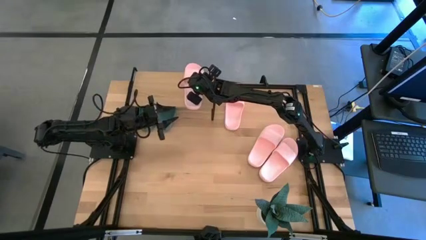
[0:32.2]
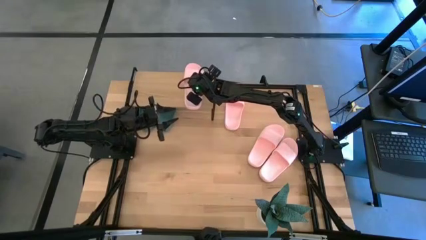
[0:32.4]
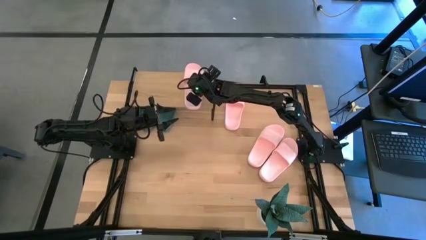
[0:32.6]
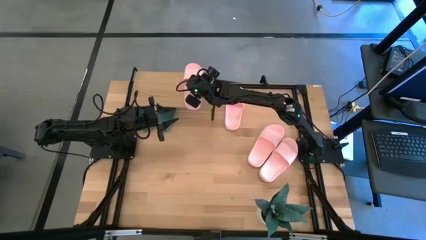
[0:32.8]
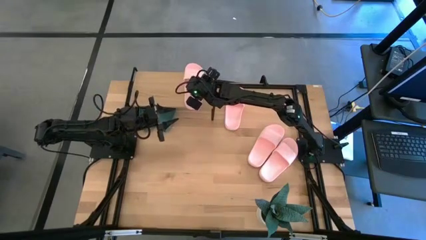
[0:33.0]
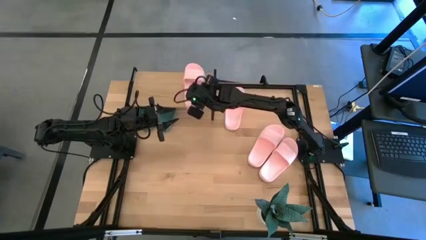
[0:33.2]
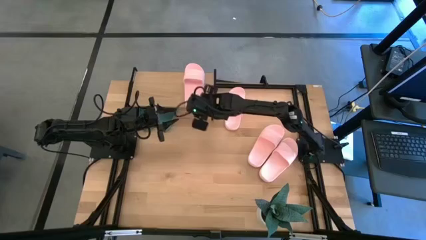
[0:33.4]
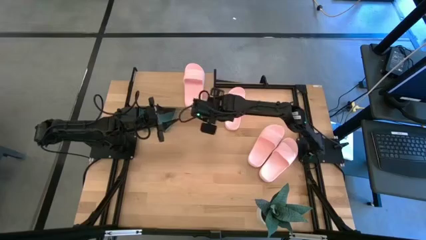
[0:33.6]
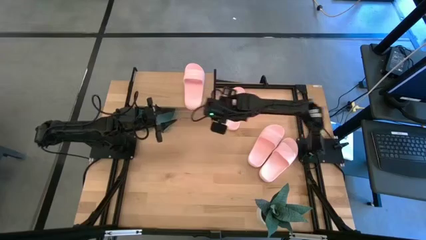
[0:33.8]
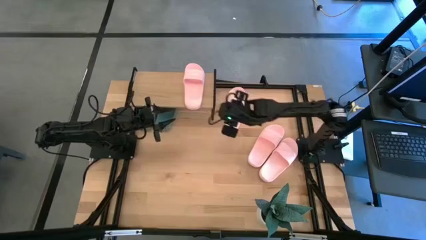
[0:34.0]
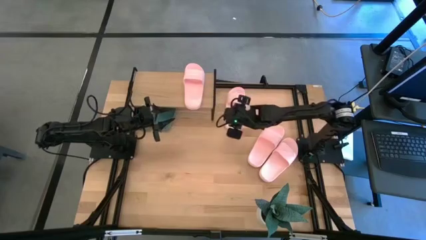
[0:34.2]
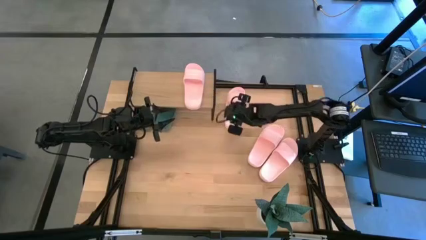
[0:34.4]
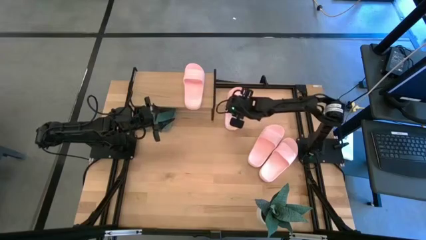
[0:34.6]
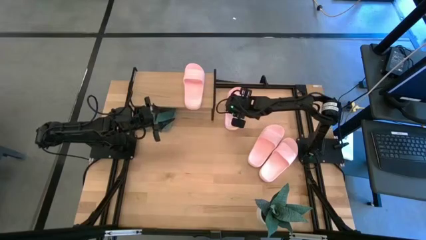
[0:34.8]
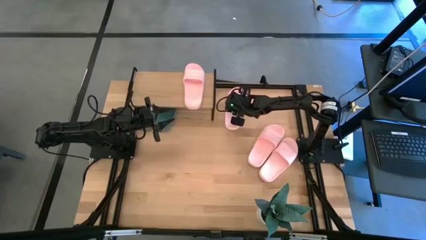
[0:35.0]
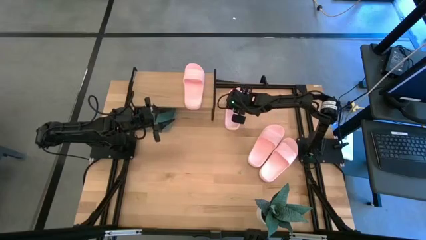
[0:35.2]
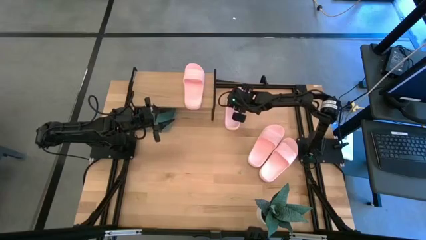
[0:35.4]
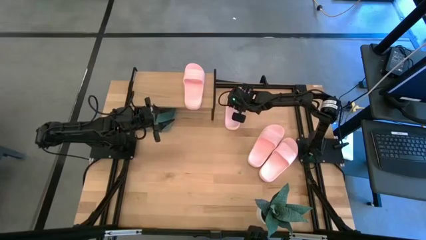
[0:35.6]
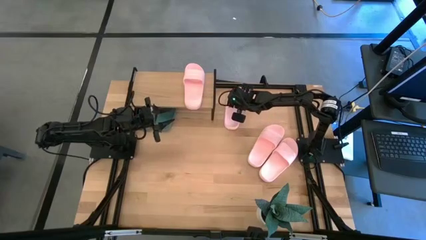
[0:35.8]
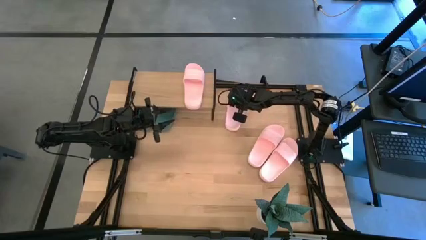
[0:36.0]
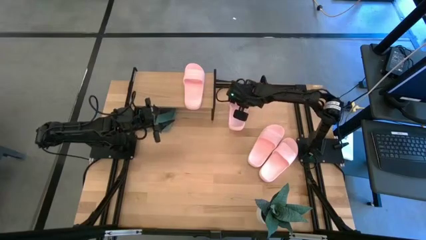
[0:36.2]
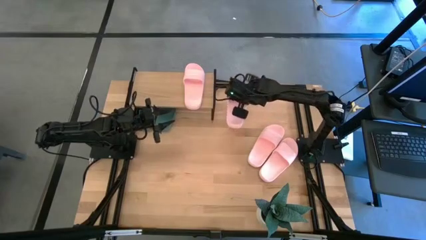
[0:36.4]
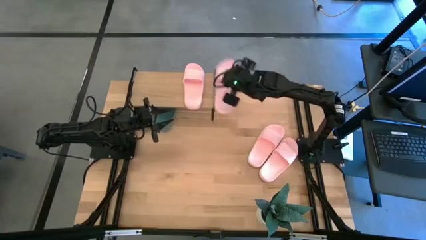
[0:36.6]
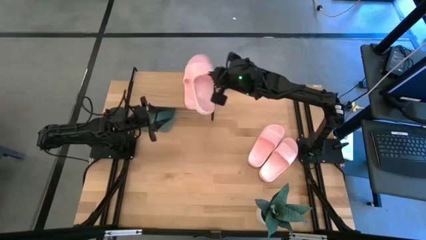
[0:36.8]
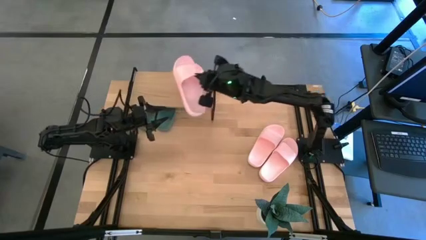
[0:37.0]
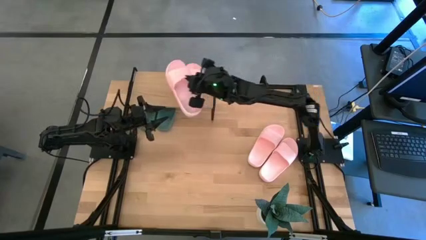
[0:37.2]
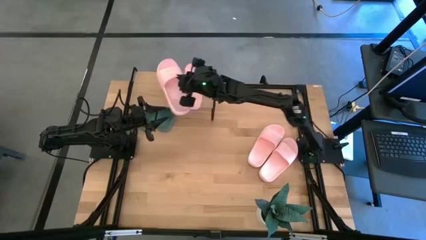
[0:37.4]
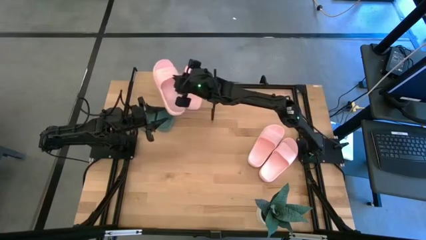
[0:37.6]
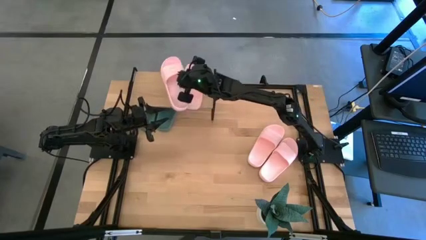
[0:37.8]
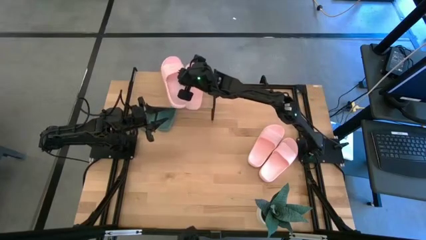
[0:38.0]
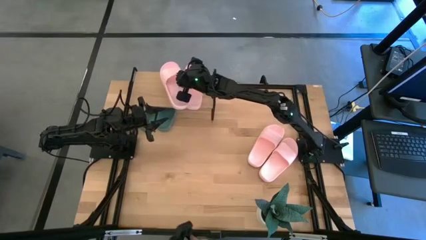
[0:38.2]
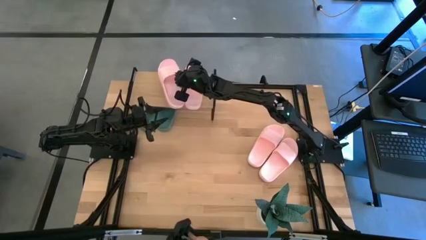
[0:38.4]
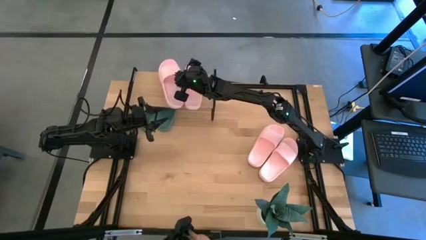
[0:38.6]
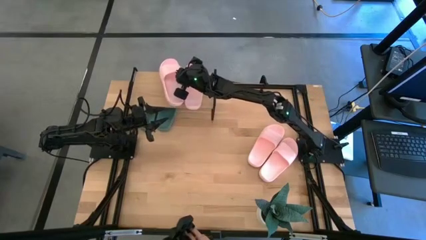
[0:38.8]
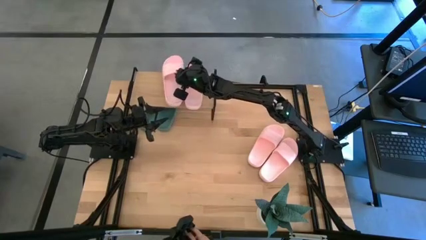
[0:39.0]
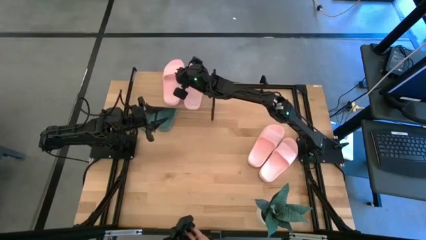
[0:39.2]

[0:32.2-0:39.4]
Task: Pick and place slides into the shelf
Put the pink slide on the shelf

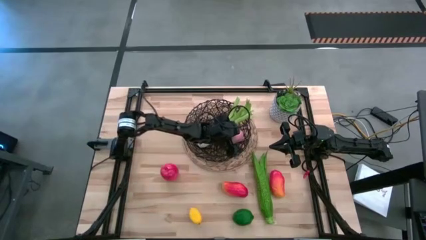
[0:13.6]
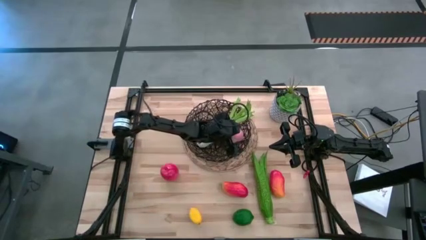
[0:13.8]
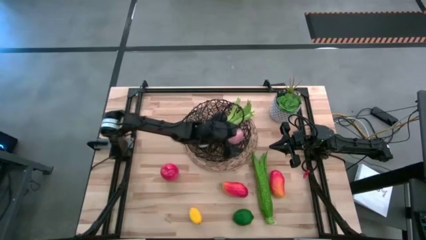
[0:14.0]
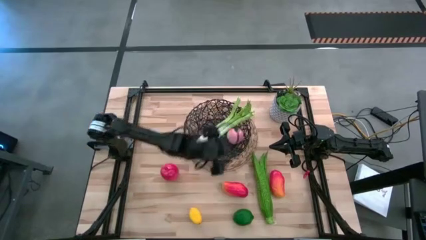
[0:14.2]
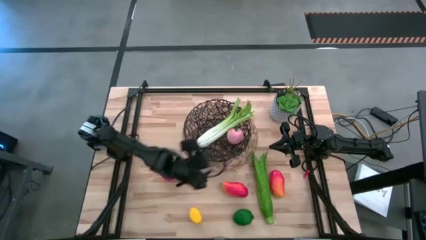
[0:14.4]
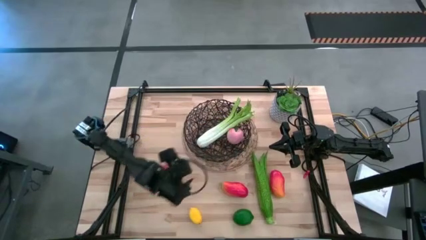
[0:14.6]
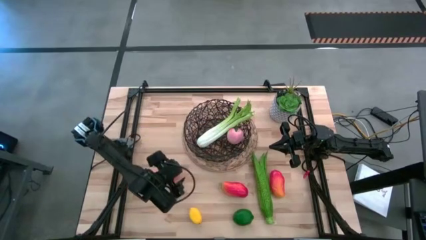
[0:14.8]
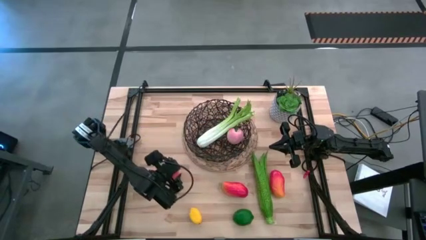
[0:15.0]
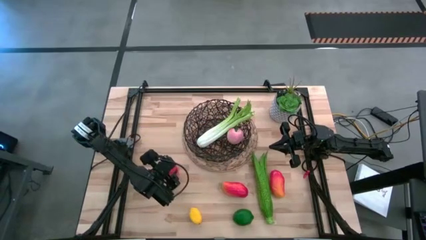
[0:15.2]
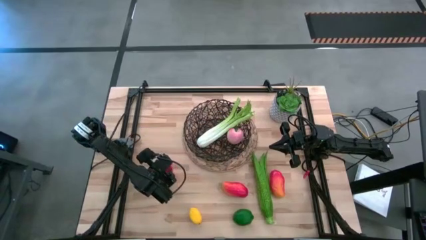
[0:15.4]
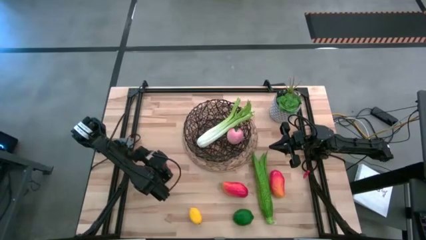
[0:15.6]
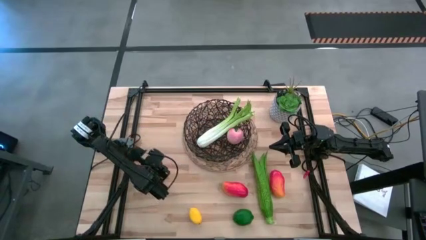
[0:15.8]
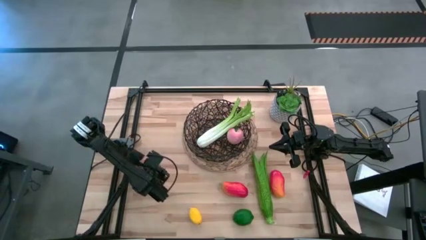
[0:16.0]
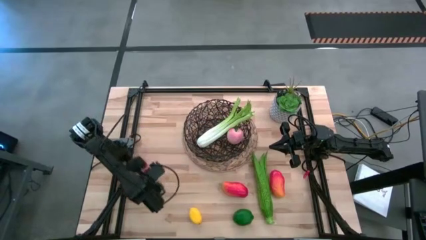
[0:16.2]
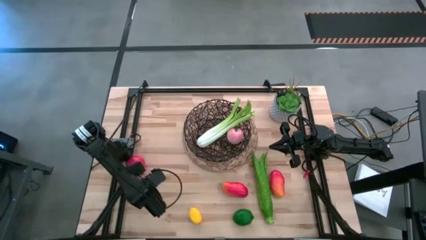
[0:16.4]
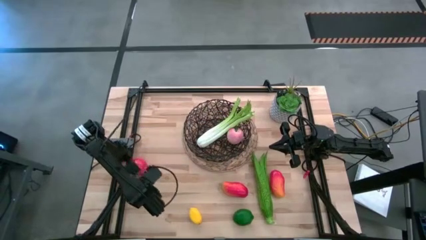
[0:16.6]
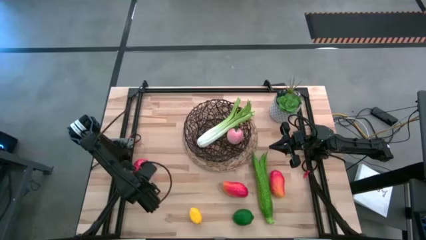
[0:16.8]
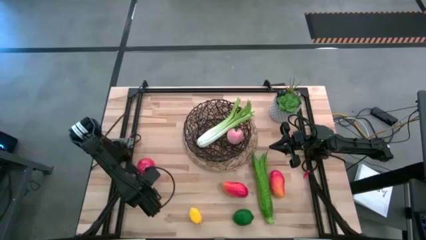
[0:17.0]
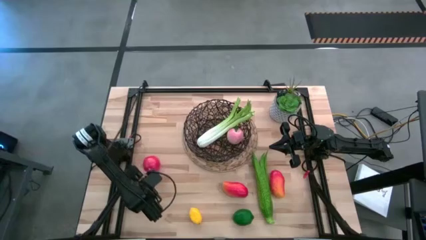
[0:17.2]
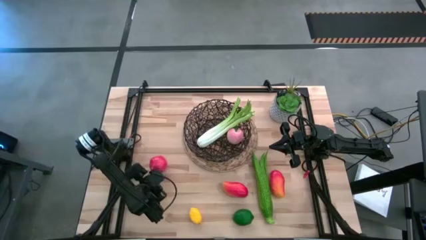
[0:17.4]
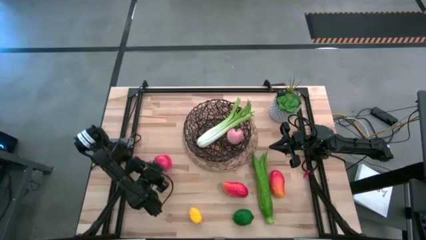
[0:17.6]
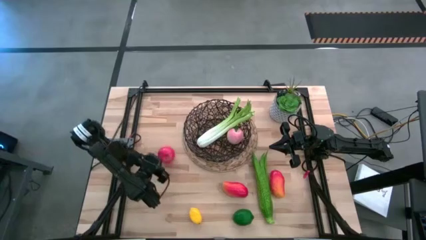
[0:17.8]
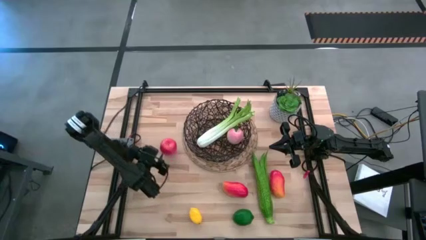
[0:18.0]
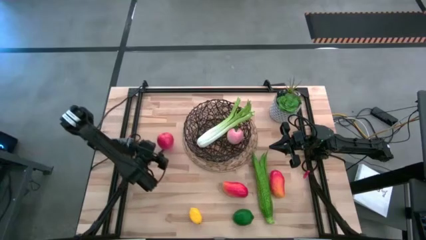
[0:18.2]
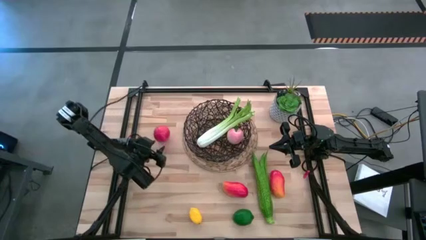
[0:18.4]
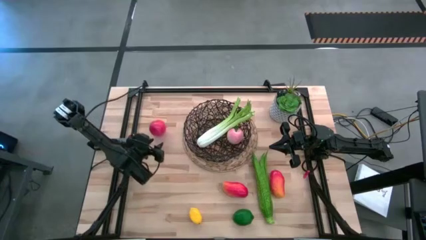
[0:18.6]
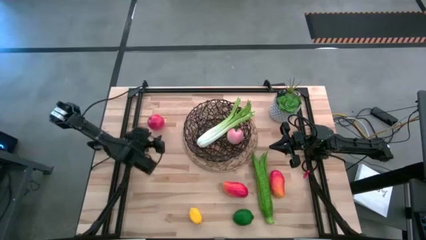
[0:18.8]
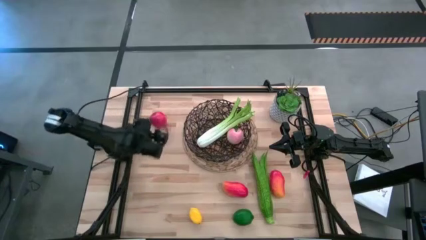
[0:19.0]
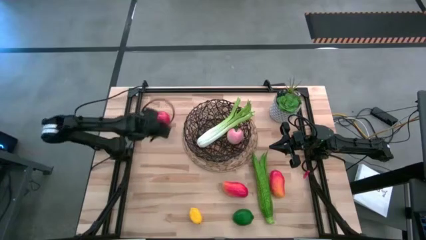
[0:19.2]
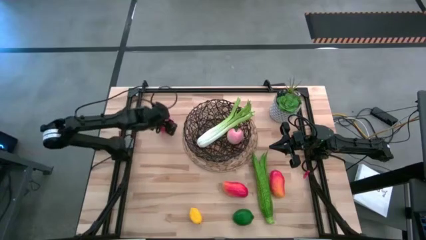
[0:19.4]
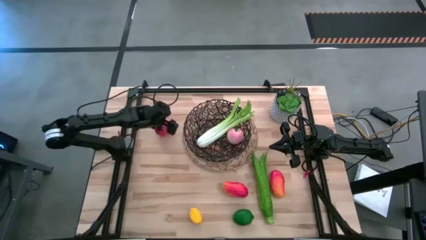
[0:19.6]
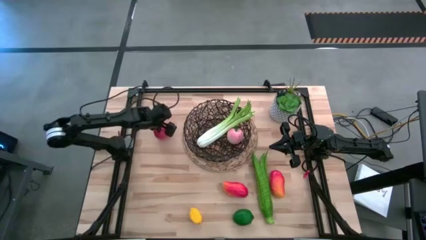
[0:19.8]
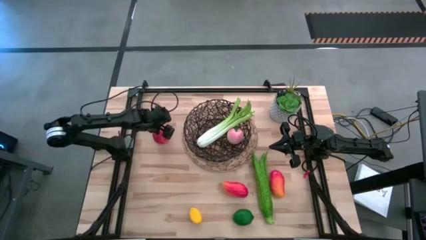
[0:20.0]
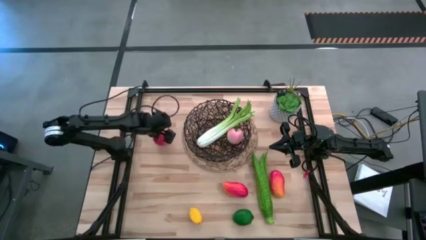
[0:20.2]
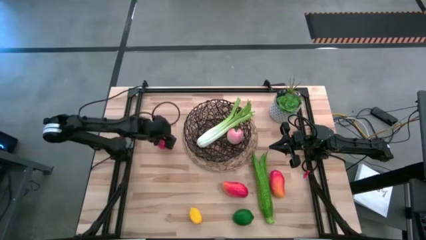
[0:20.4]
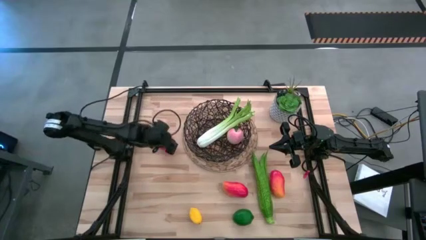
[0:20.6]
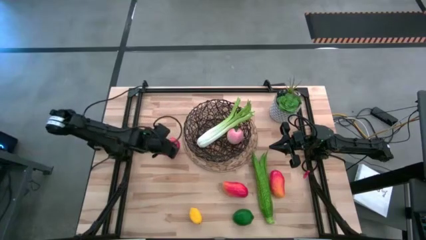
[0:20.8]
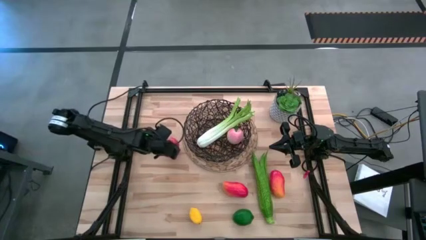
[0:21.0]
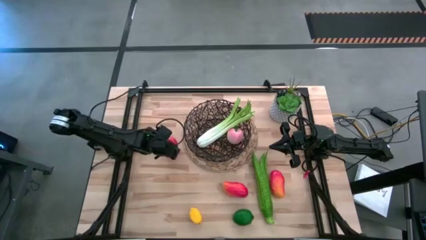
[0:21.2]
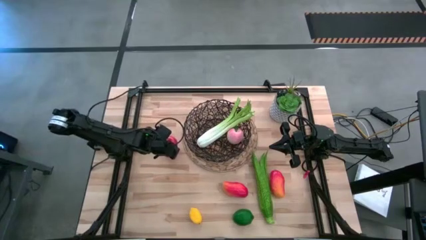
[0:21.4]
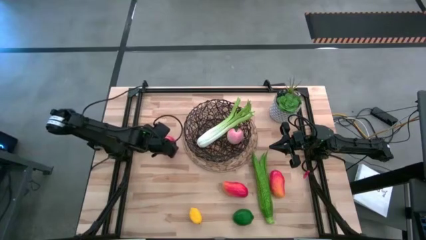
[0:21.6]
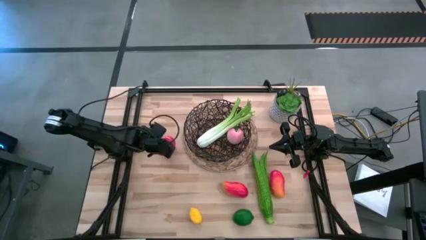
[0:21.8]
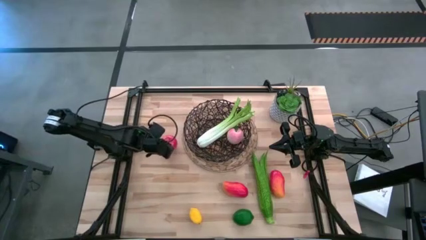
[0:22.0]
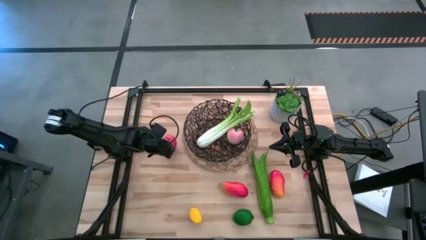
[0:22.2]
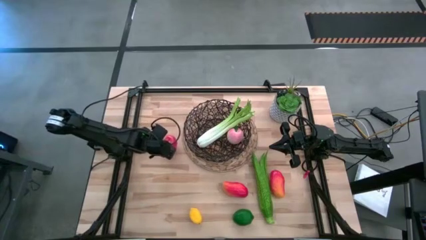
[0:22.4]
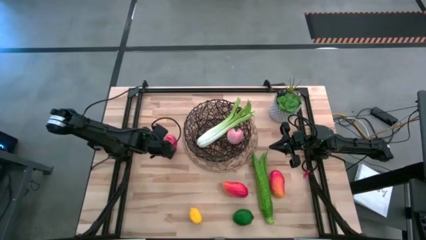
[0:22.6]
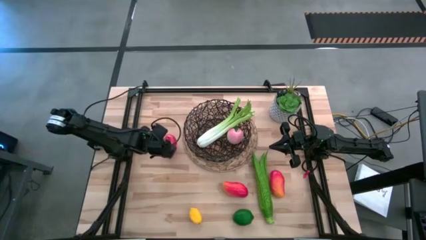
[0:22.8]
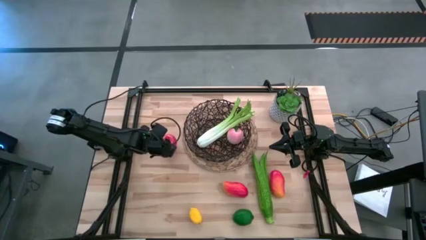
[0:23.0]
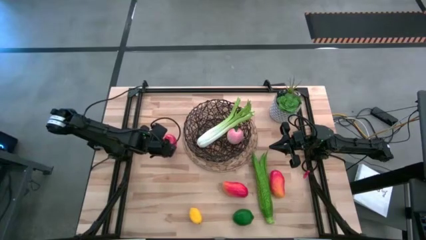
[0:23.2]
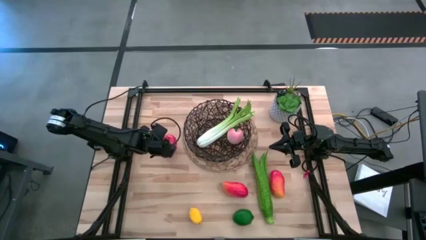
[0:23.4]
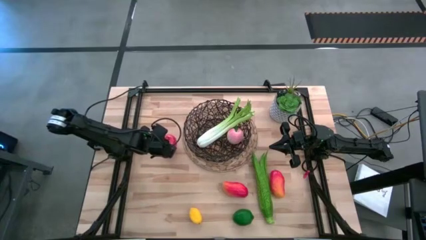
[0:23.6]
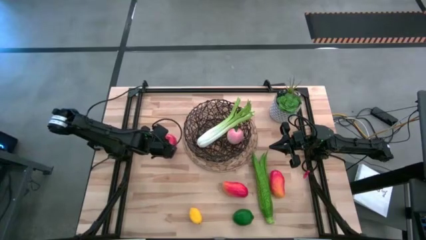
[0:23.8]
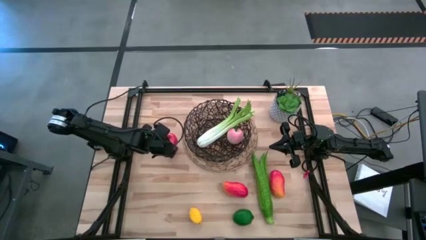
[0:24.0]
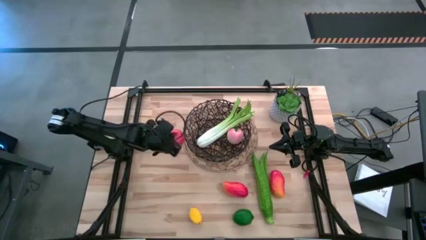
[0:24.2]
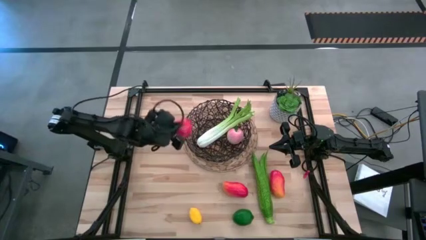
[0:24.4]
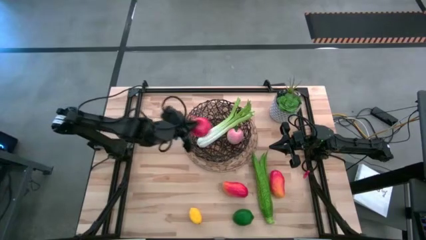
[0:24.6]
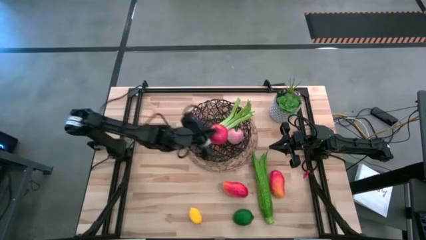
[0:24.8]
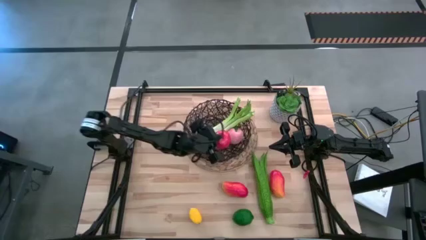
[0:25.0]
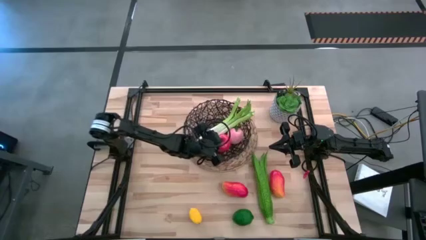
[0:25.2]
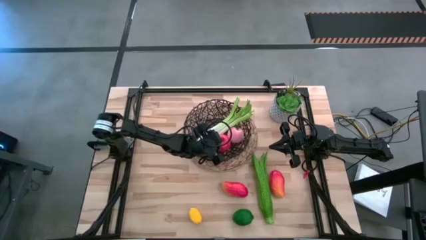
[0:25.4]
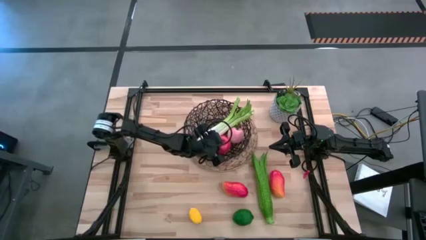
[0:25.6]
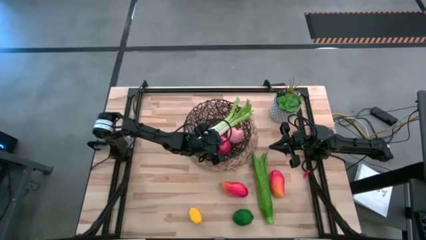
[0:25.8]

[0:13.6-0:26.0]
Task: Build produce basket
Put the red apple into the black mesh basket
